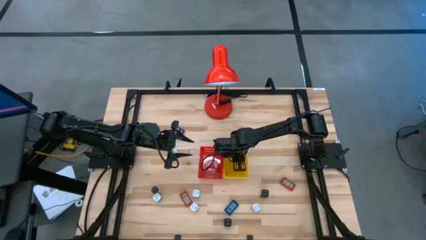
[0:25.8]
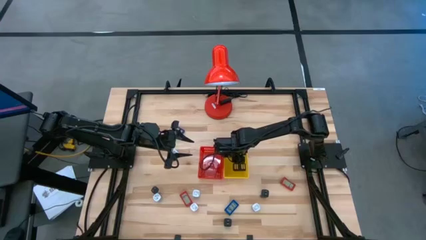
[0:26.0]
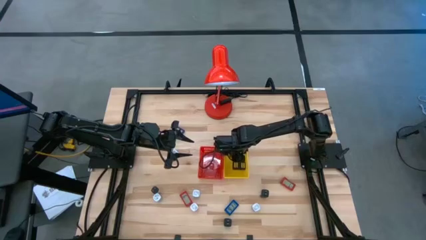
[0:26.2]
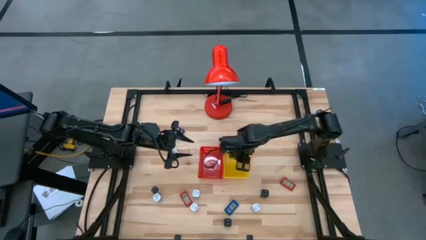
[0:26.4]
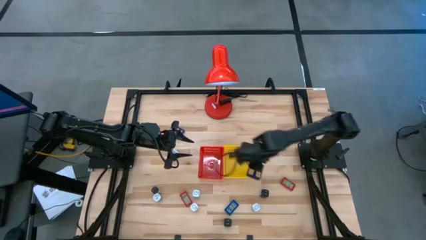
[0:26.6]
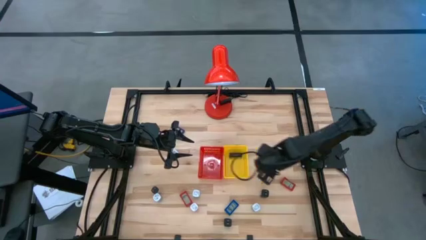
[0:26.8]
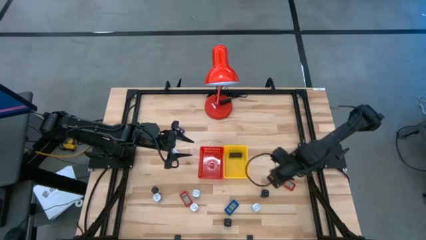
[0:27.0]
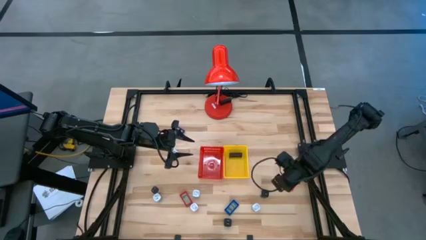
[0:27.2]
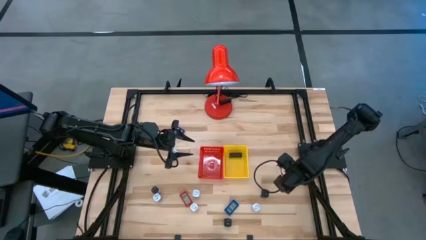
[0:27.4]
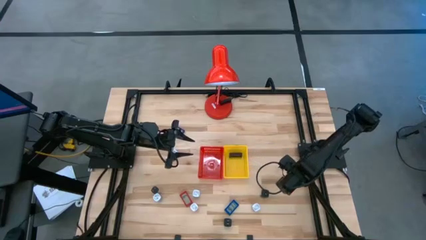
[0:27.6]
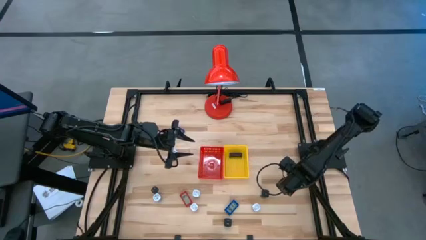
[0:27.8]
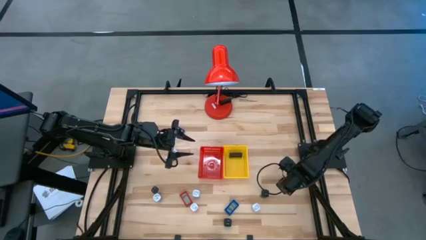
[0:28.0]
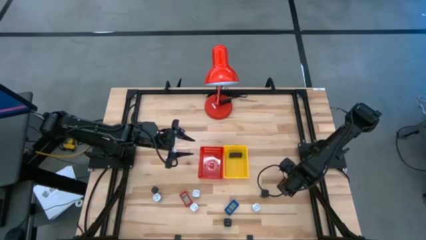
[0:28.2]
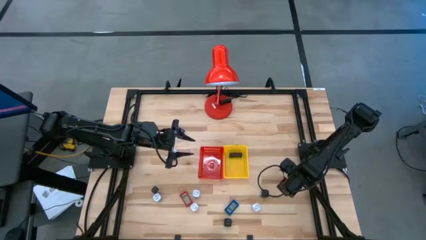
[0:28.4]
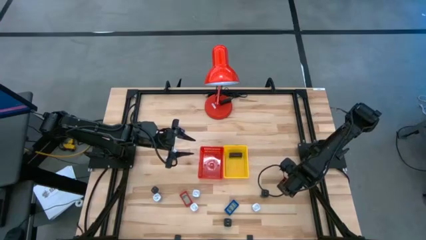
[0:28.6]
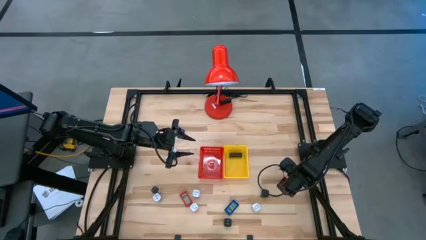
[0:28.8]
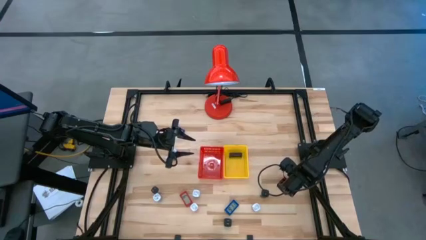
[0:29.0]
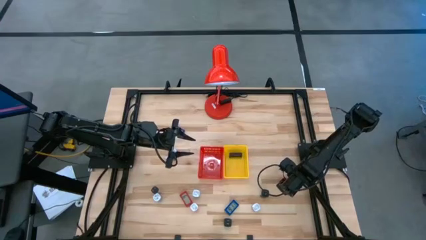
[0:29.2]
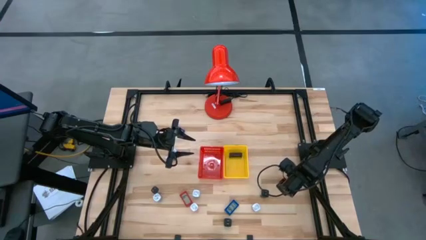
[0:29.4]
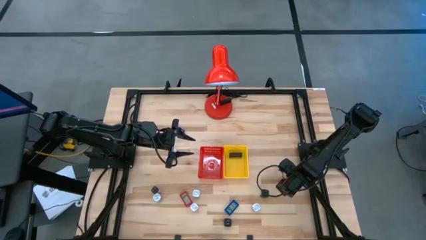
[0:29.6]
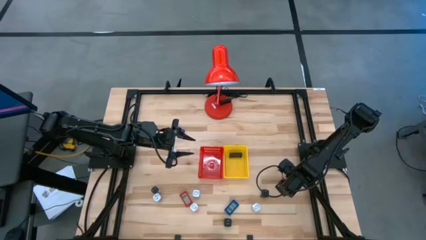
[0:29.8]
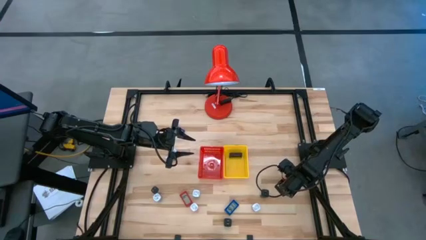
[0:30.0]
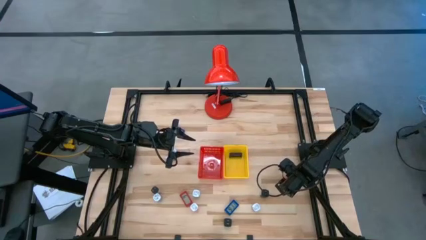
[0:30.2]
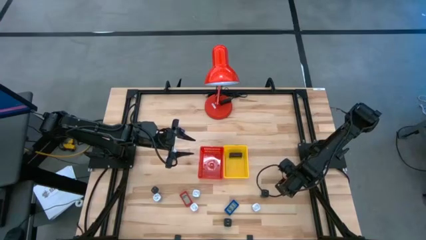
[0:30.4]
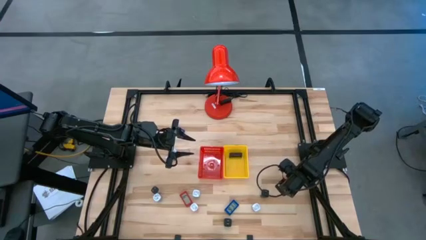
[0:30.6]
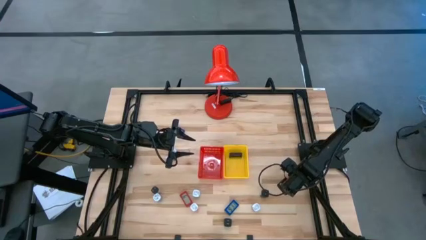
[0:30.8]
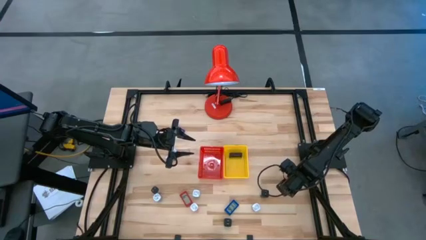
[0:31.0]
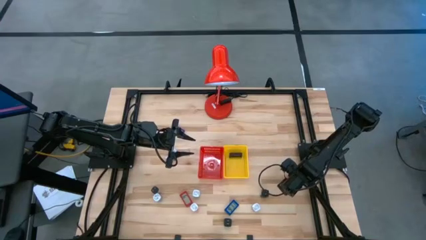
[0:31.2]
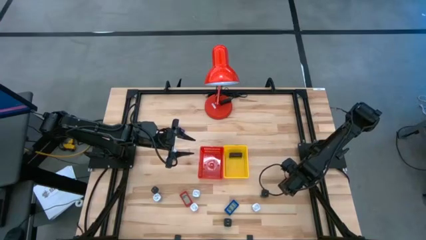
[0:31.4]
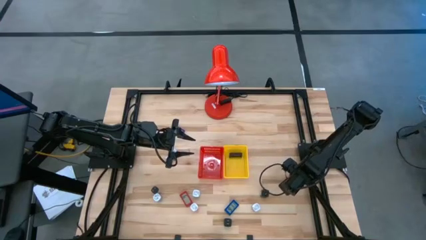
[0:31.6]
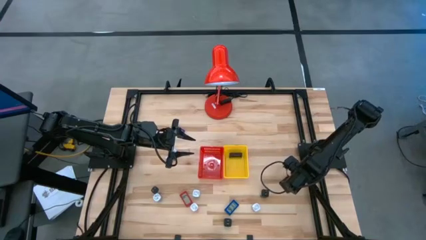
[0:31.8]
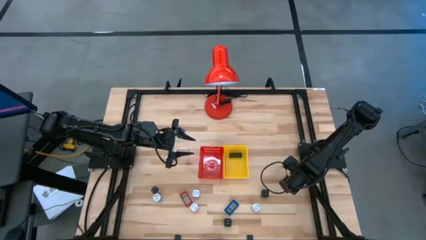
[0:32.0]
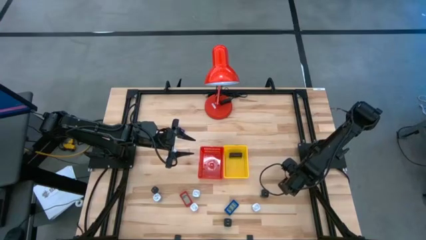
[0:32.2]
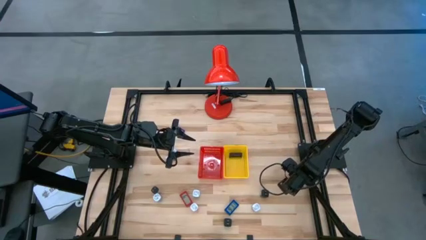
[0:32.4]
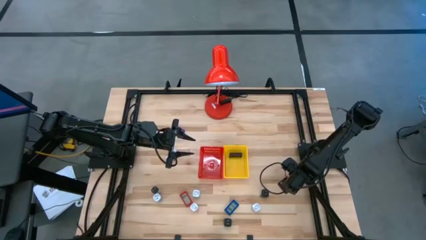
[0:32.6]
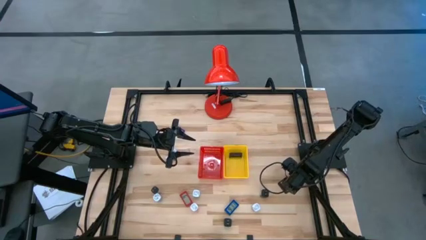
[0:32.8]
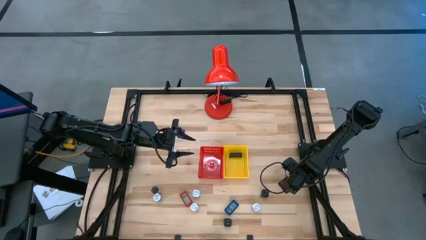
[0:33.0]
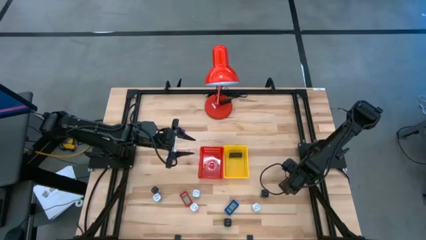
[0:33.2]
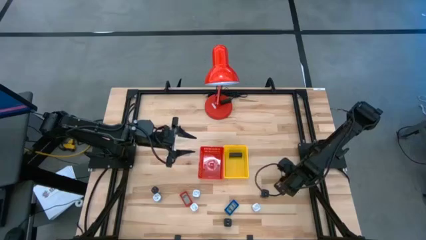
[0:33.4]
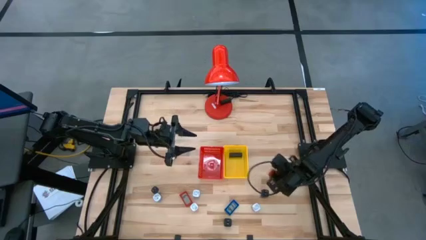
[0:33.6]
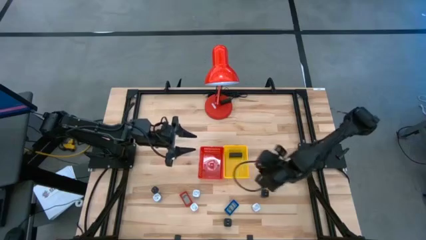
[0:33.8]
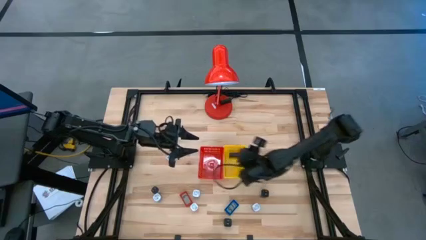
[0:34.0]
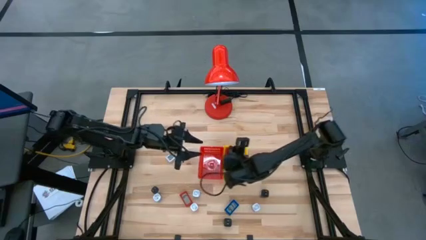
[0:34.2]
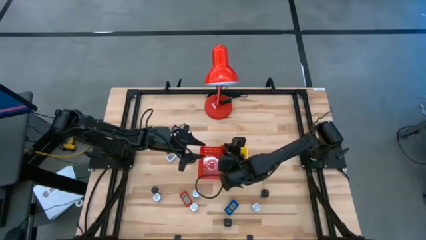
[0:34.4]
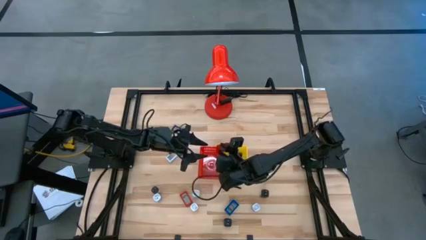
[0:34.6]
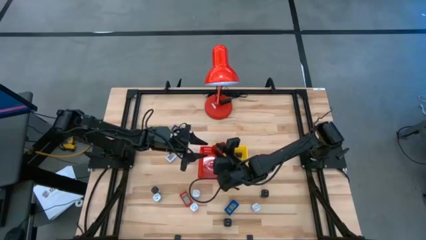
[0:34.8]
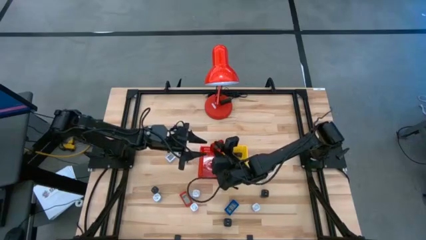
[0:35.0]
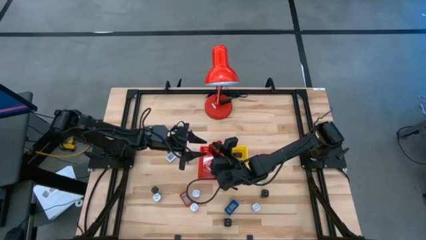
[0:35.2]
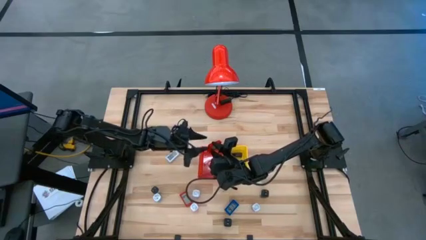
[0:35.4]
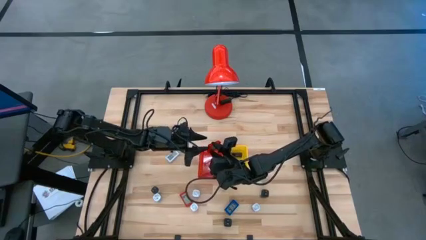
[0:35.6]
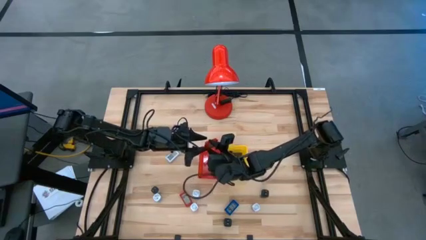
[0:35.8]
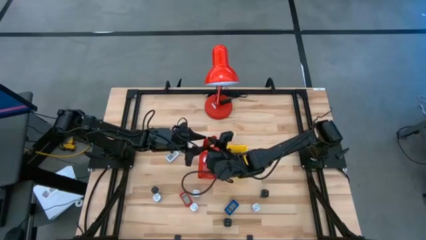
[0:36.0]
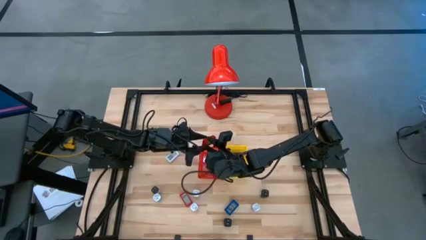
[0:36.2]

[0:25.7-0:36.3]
Task: Pick & Place Office items
Put the red digital timer into the yellow bin
